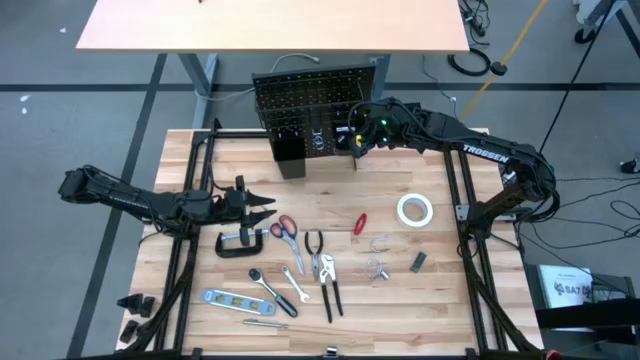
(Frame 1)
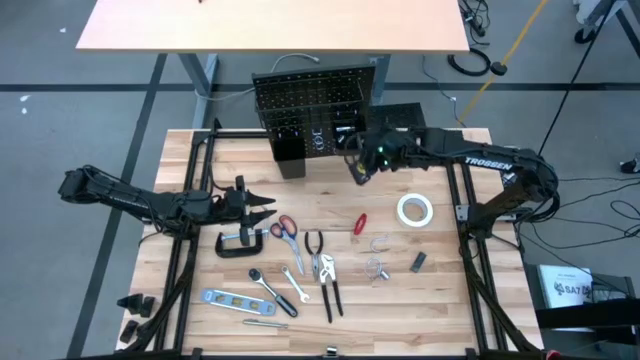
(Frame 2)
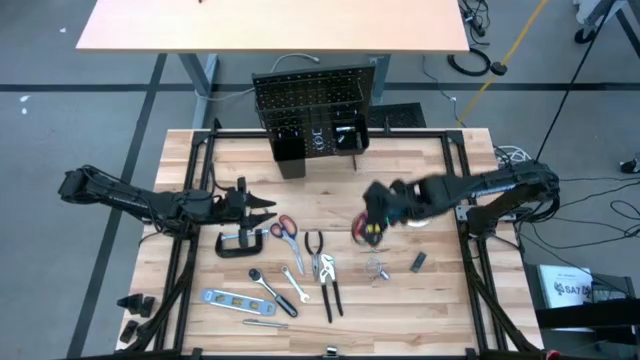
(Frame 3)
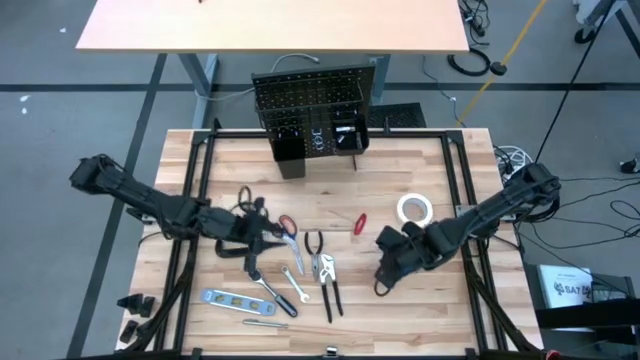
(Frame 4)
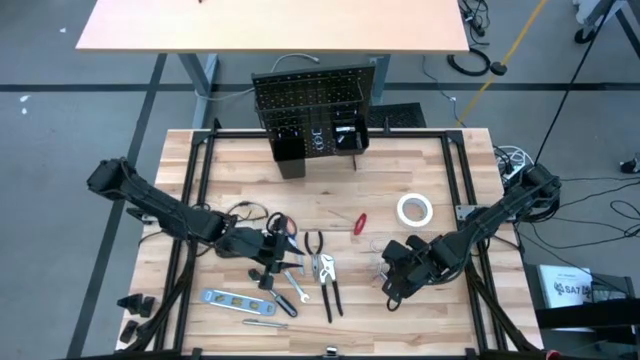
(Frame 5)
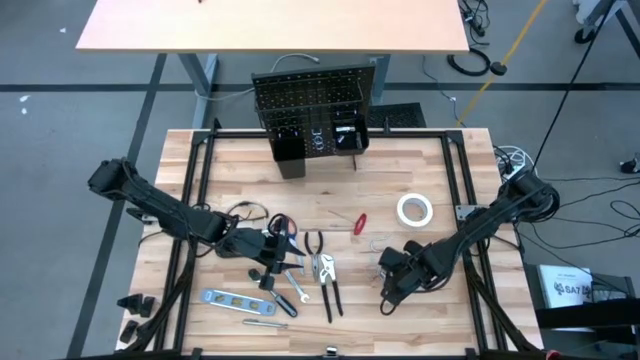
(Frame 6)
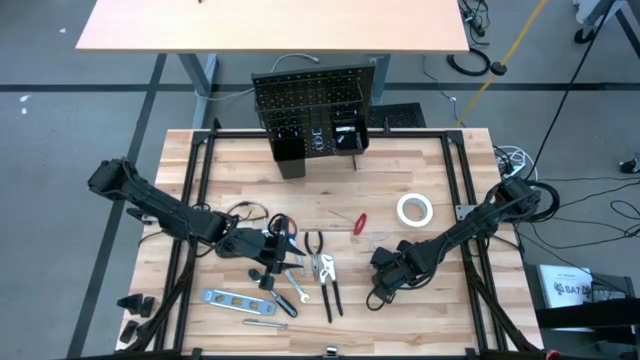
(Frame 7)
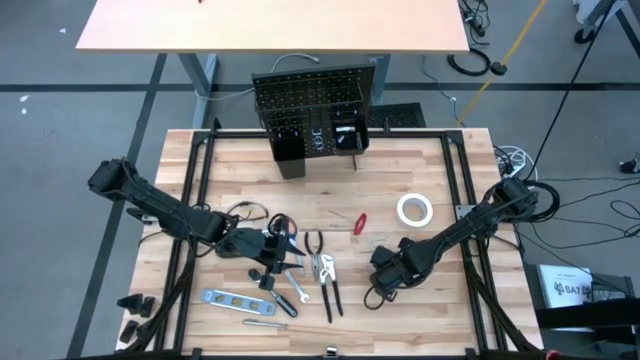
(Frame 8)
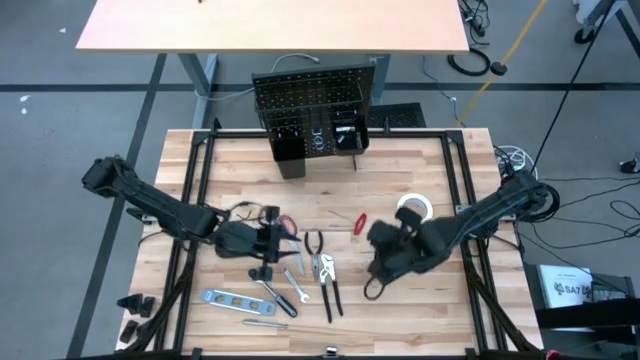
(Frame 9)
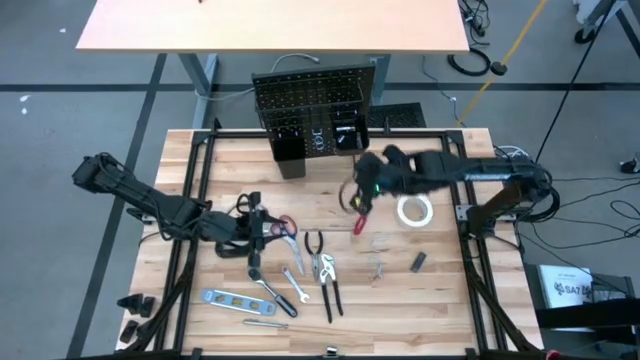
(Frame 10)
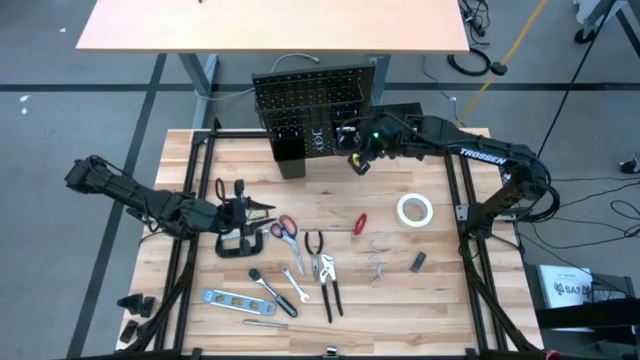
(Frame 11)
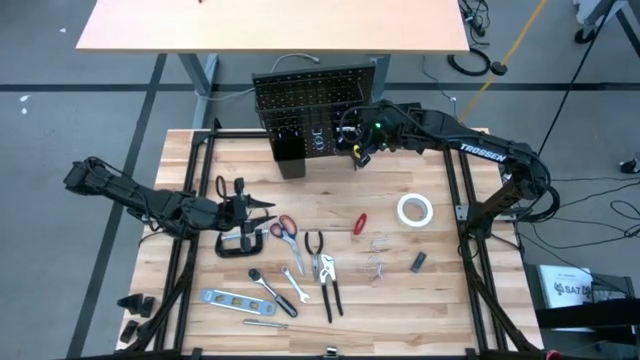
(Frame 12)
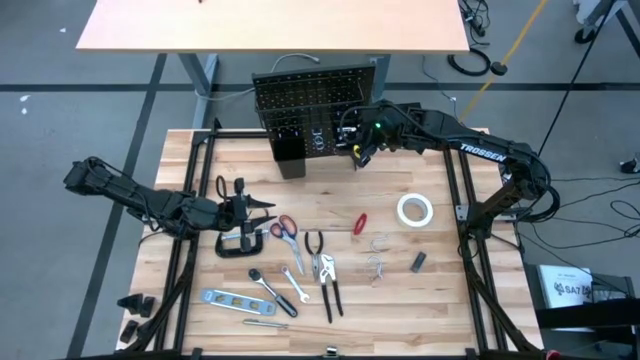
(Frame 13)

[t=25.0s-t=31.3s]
Task: Hang tools onto peg board
Put the wrench socket on the right black bin on the peg board

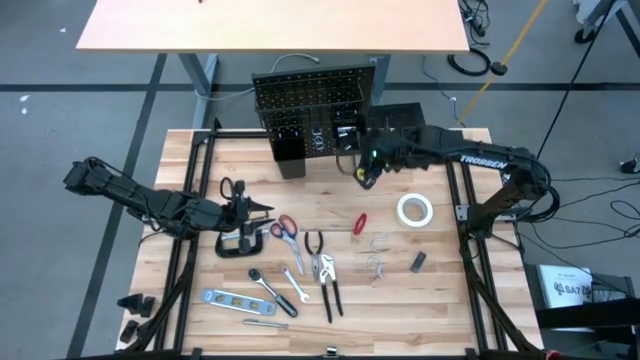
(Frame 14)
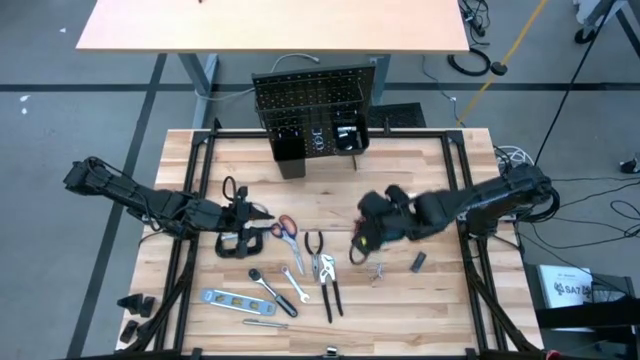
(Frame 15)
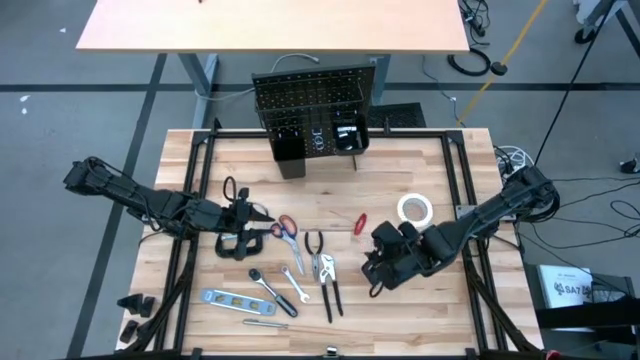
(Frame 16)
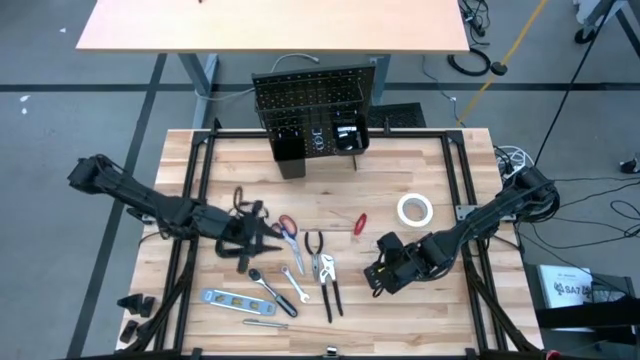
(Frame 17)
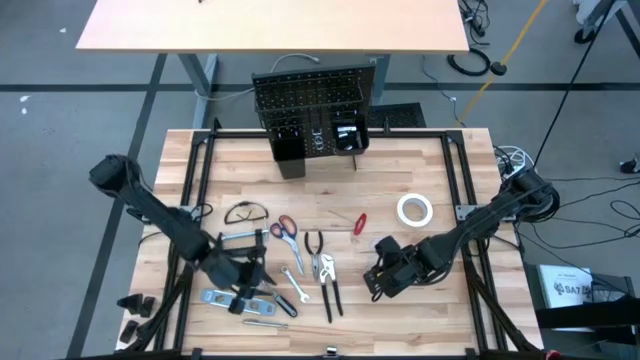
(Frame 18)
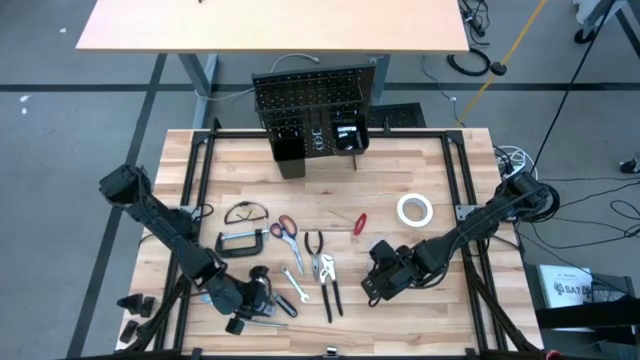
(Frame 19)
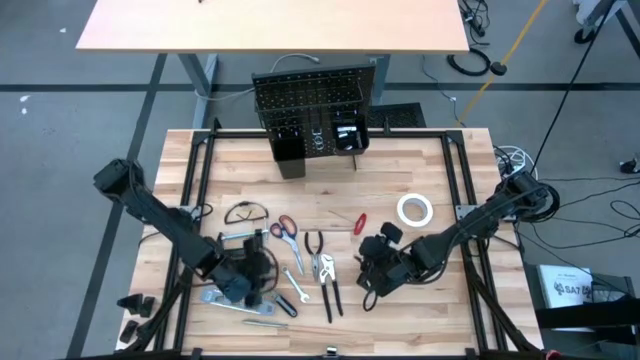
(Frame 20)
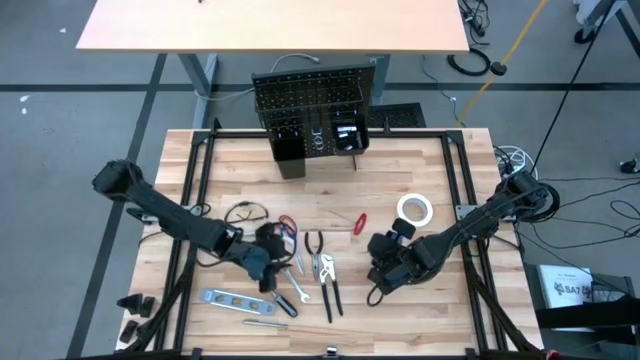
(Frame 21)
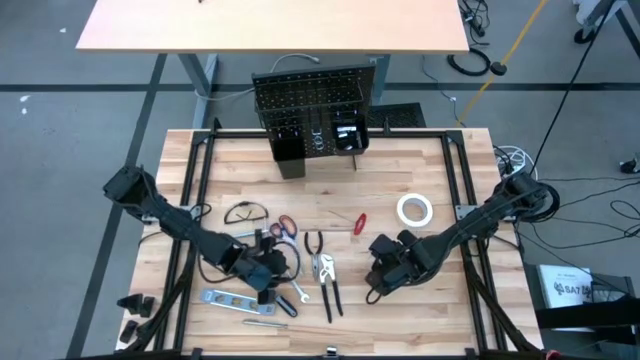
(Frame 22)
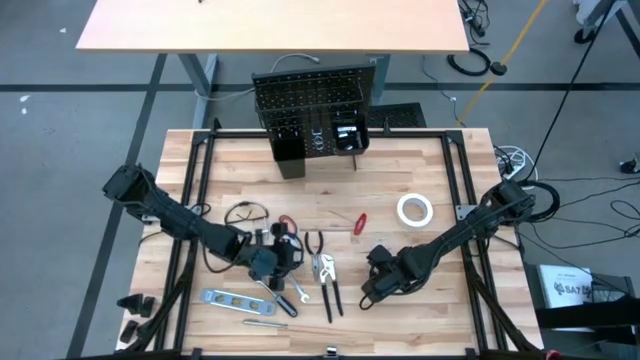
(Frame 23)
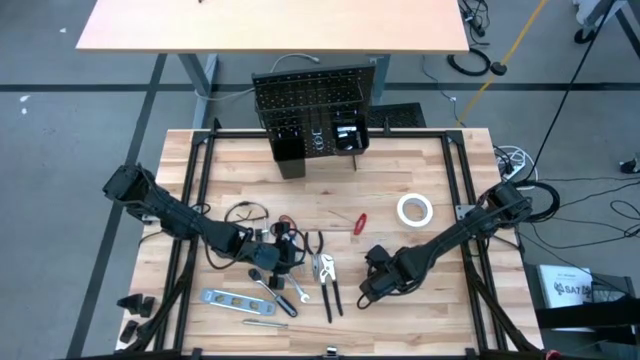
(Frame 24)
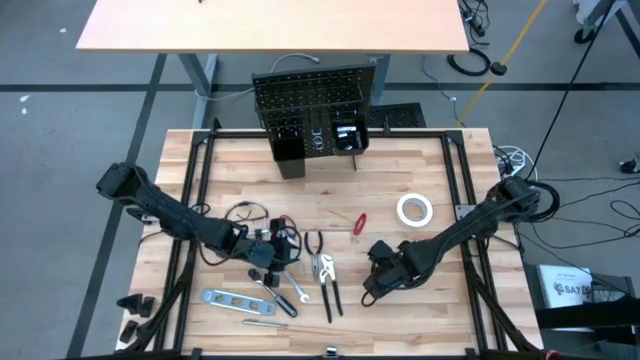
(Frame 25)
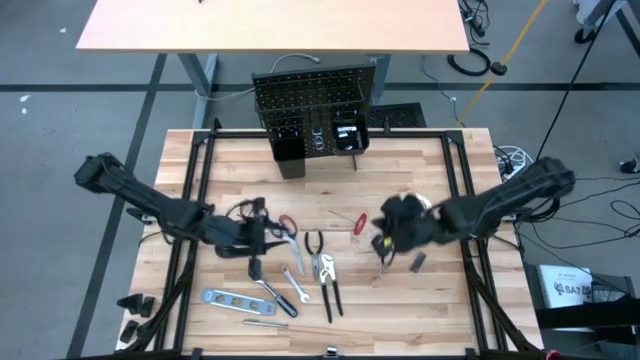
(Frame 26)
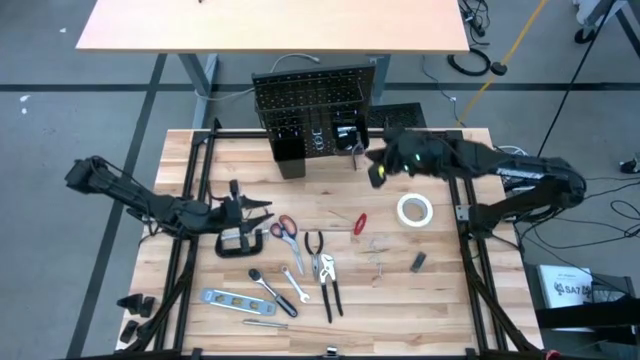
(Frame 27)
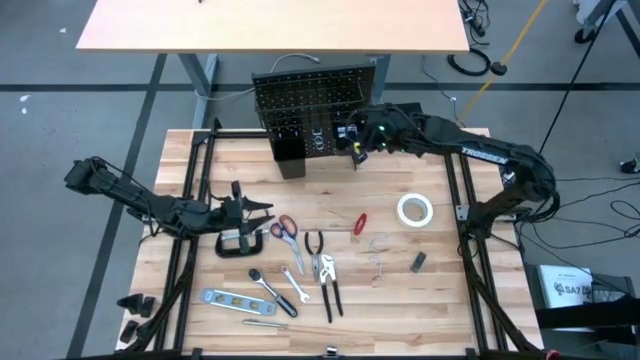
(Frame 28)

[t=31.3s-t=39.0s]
Put the binder clip on the right black bin on the peg board

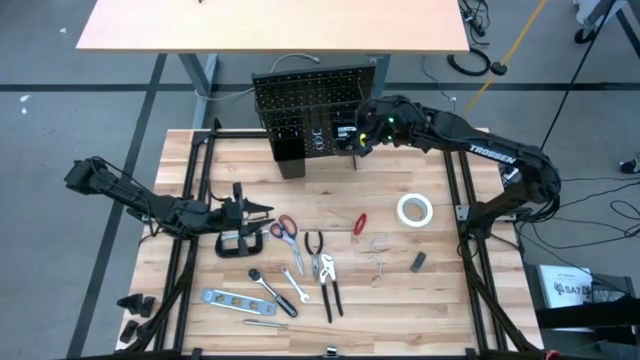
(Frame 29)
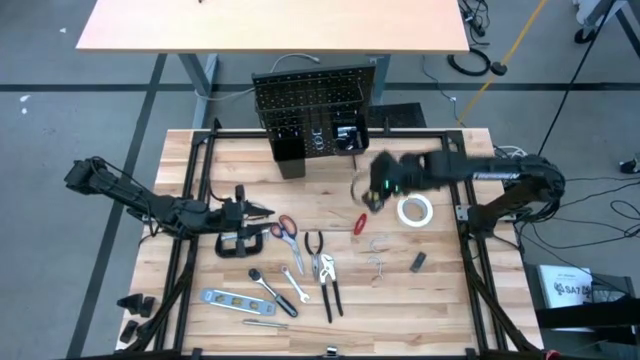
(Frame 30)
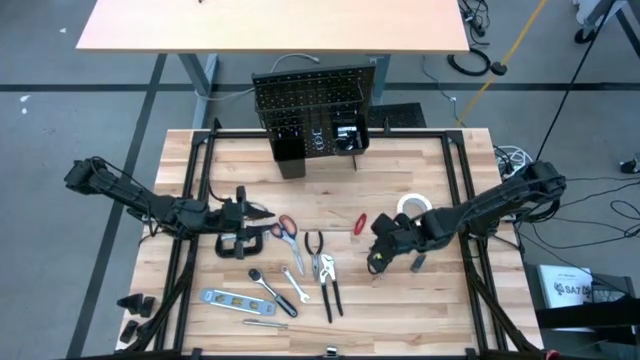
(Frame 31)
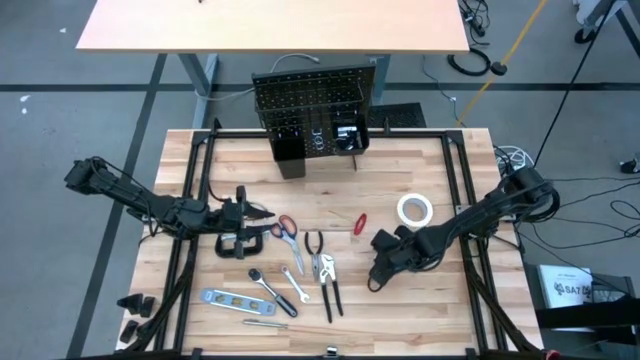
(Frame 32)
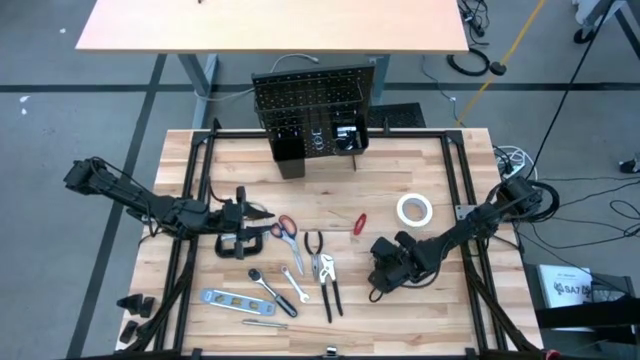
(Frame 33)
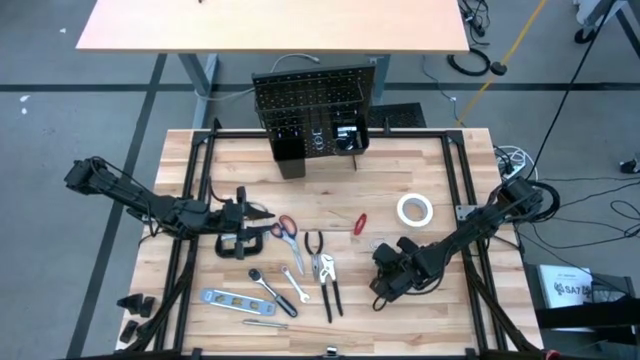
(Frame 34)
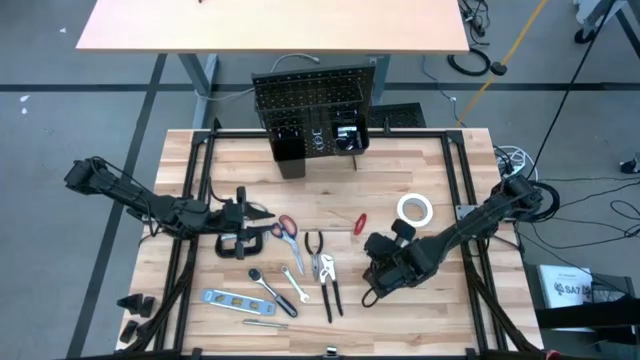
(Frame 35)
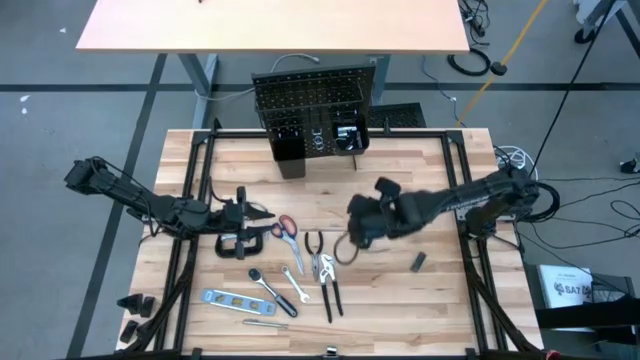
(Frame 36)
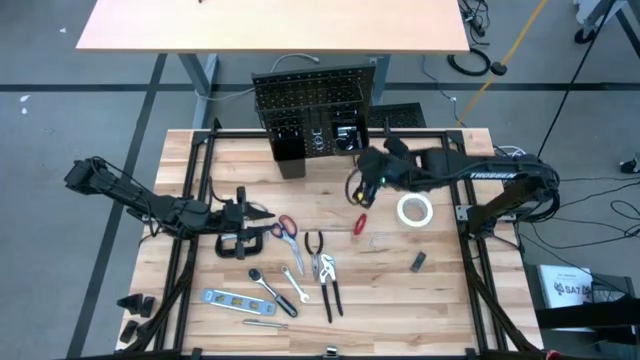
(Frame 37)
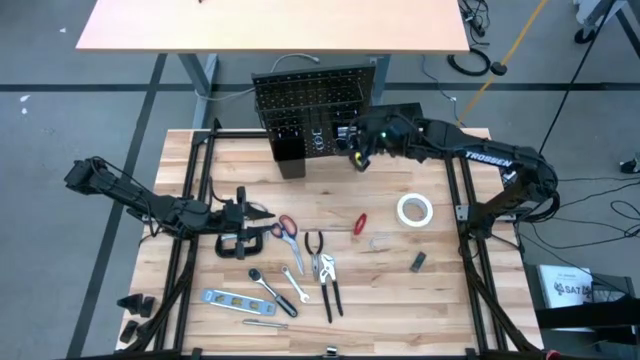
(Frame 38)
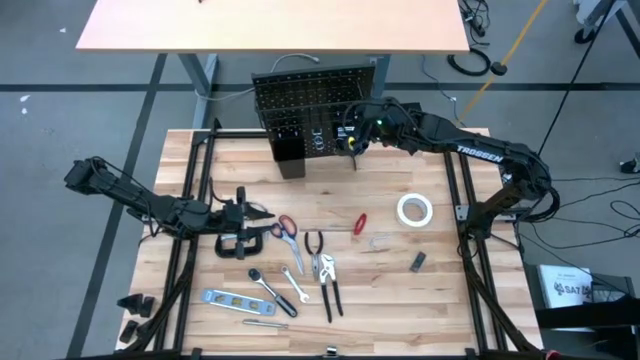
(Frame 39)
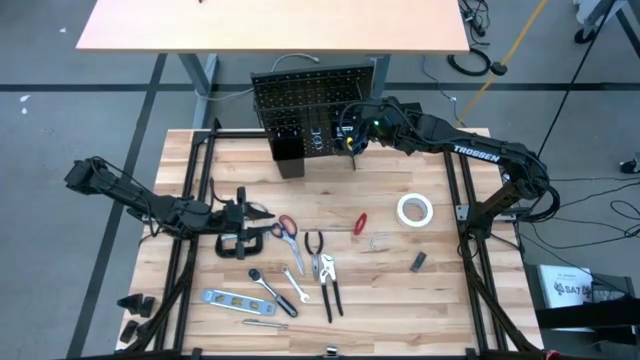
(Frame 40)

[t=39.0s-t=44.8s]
Put the bottom hanger hook on the right black bin on the peg board

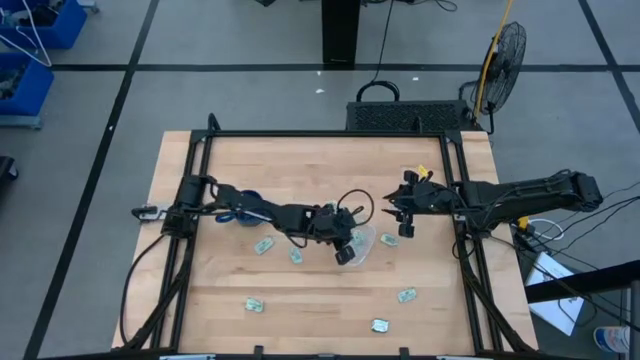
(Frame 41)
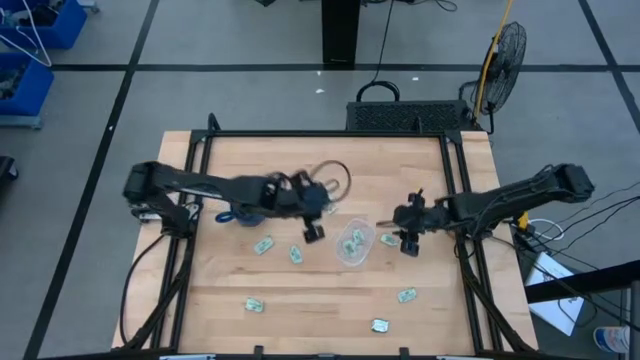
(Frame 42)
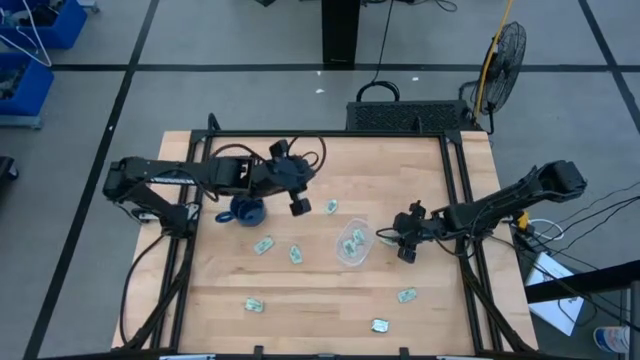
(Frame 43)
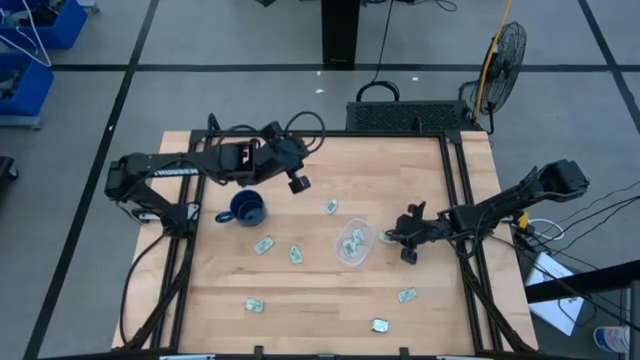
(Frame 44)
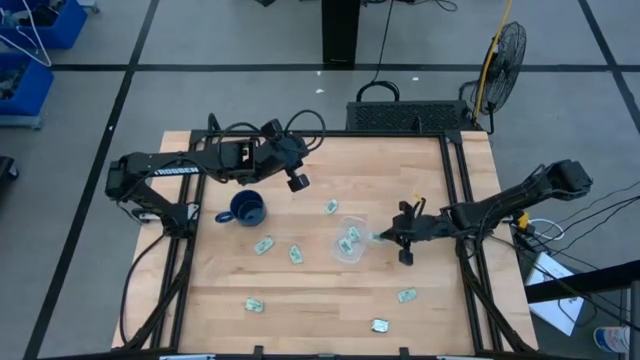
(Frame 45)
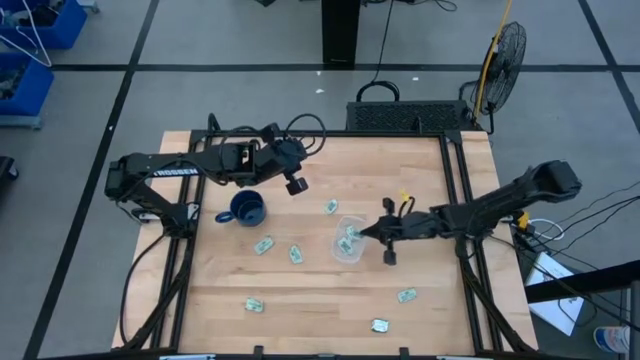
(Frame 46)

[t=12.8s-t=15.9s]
Task: Pick and place Stevia / Truvia into bins
Put the stevia packet into the transparent container
